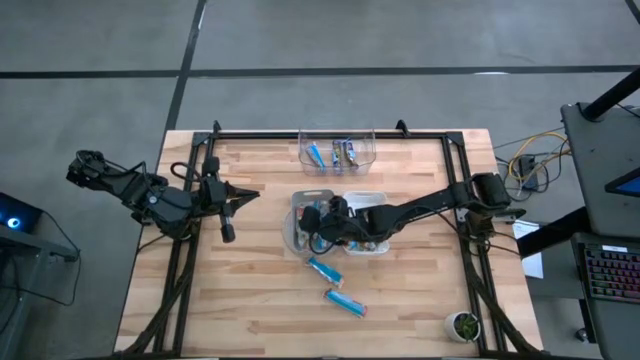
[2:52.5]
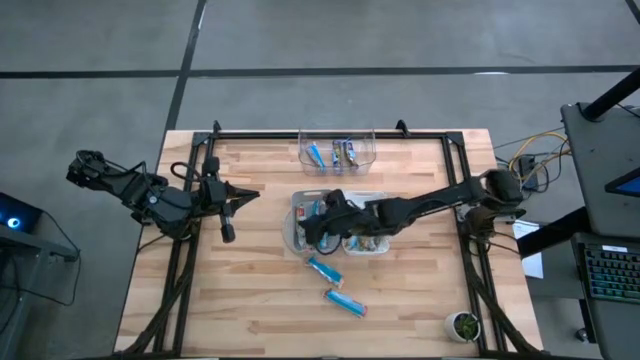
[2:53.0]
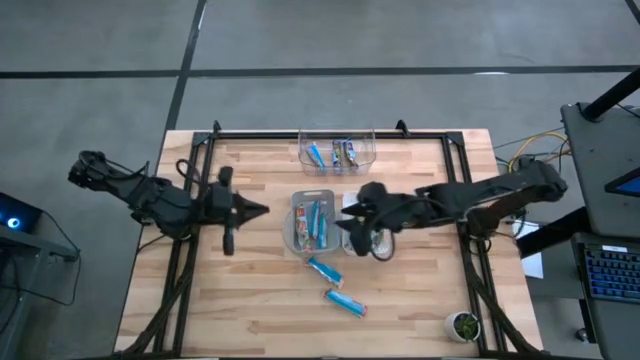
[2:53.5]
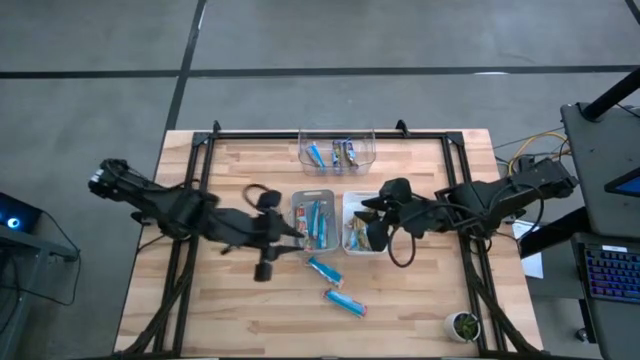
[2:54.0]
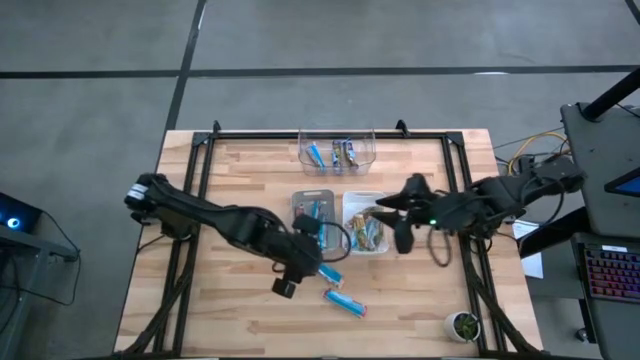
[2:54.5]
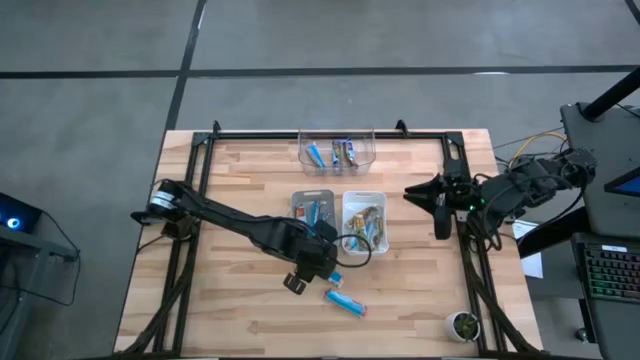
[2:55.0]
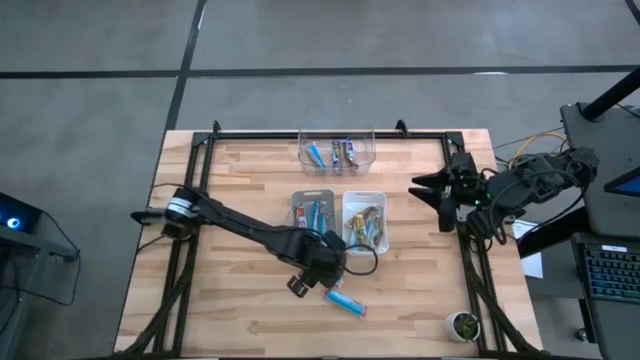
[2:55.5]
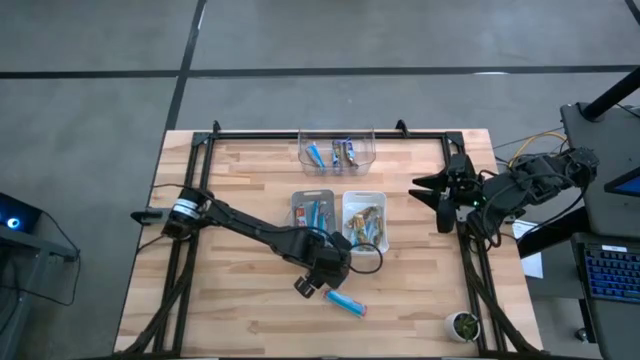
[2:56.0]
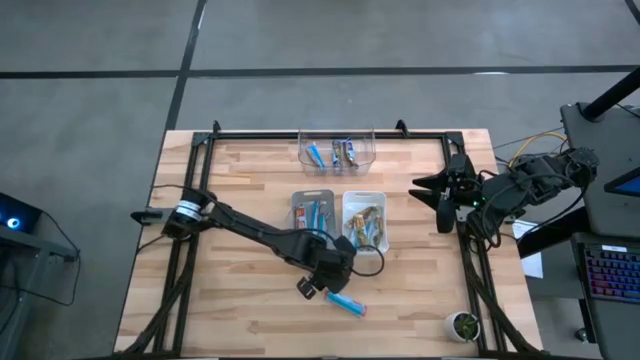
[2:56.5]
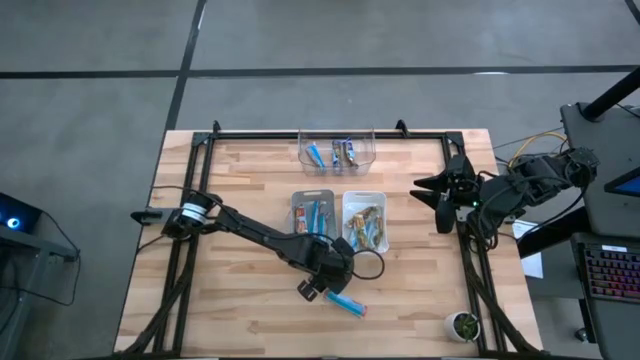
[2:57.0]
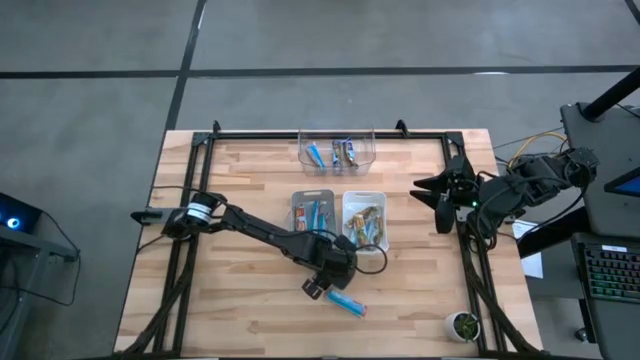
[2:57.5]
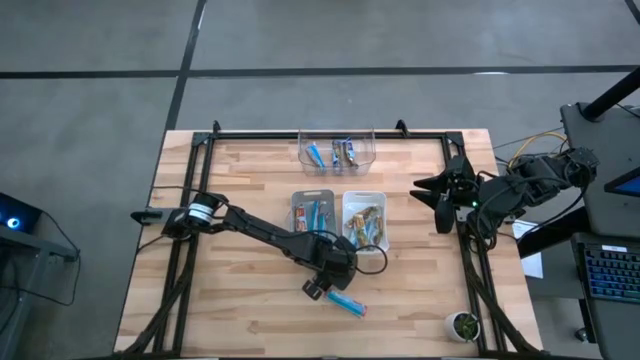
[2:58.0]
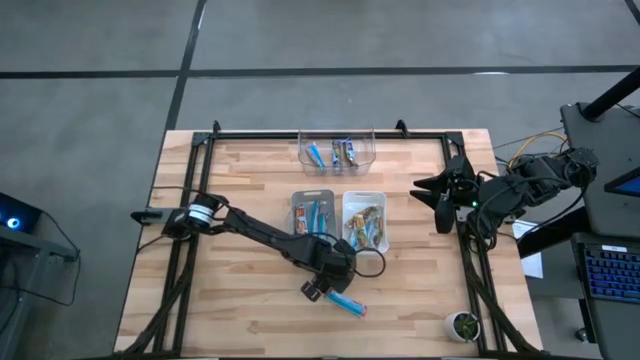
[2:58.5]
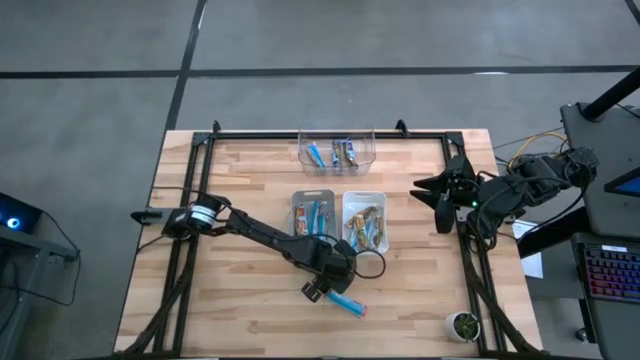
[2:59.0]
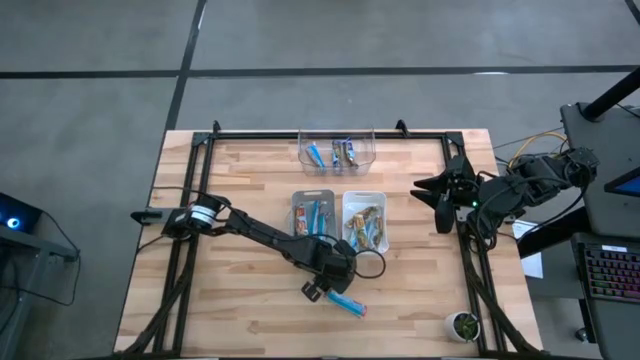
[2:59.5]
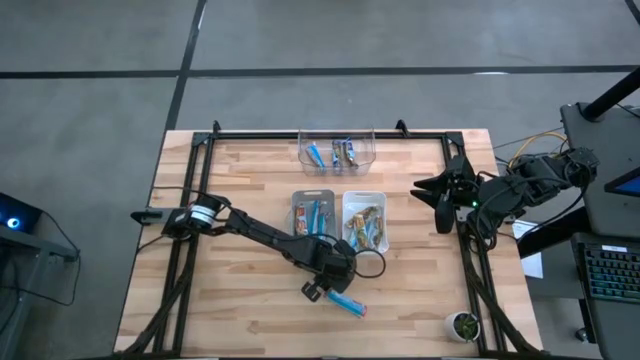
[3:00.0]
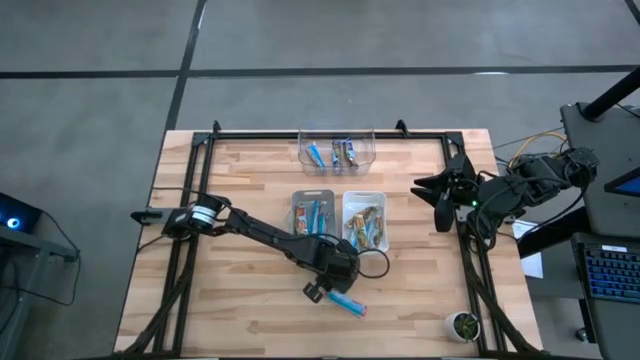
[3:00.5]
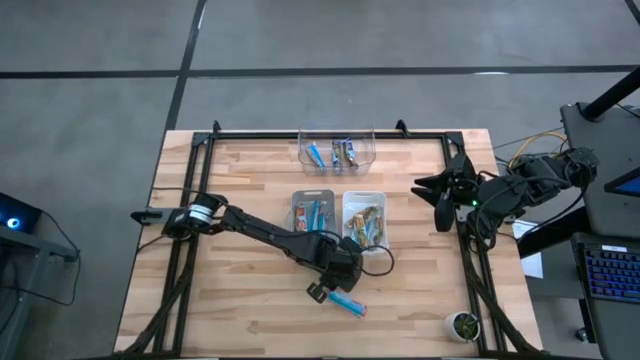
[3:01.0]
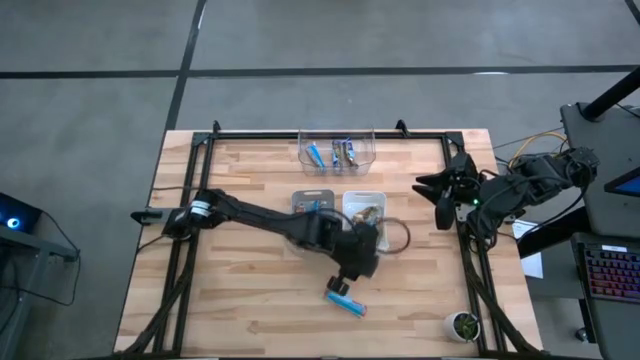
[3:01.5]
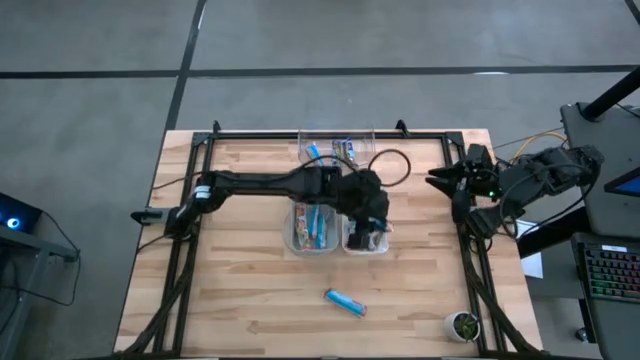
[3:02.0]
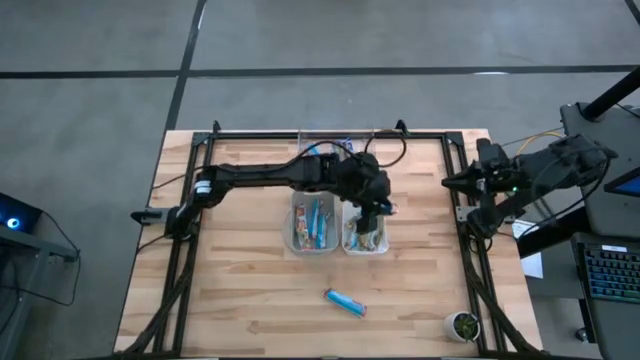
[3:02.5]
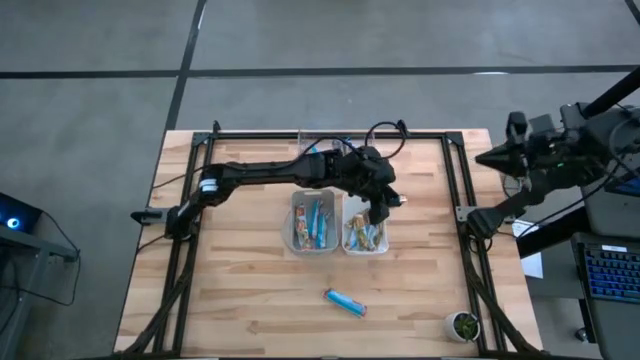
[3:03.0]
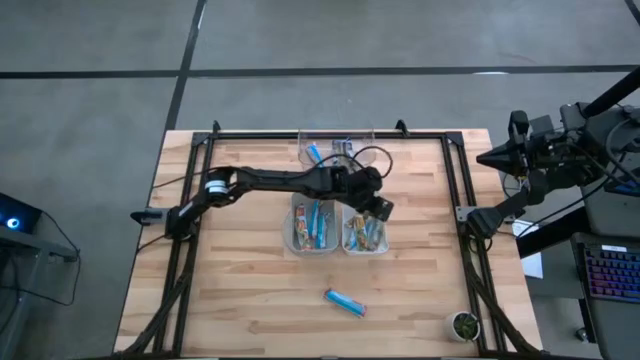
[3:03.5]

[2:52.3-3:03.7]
Task: Pick and place Granola Bars by type
Put the orange granola bar into the white bin

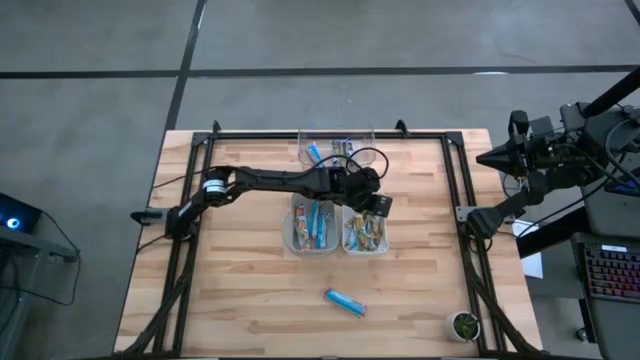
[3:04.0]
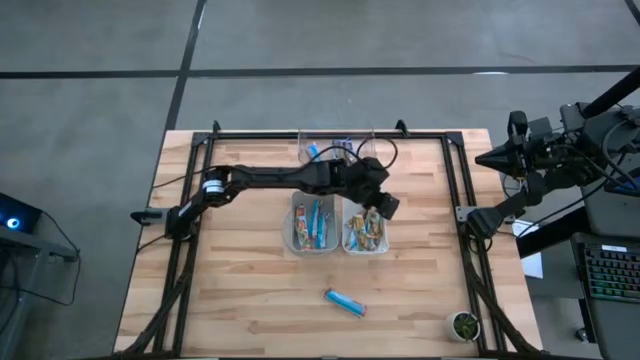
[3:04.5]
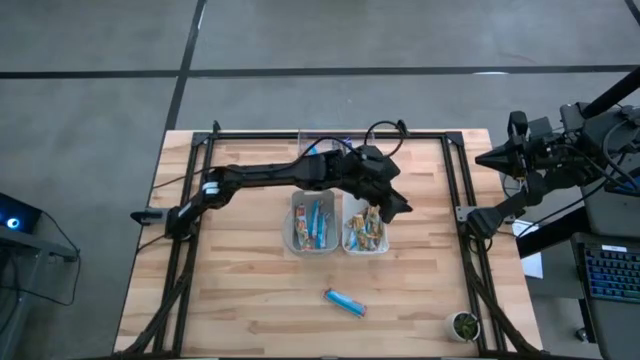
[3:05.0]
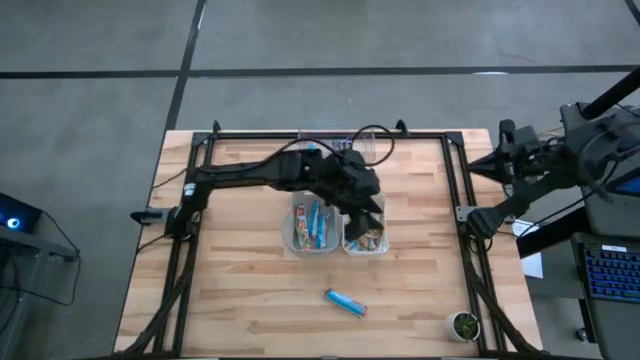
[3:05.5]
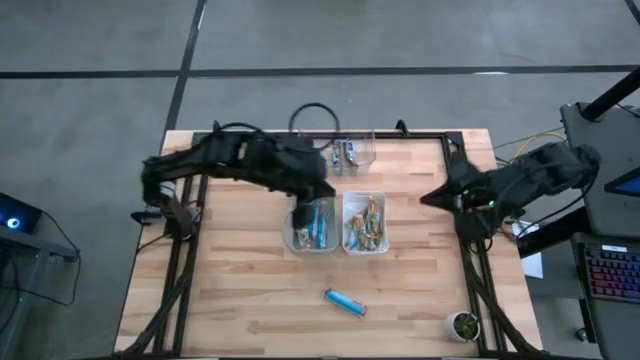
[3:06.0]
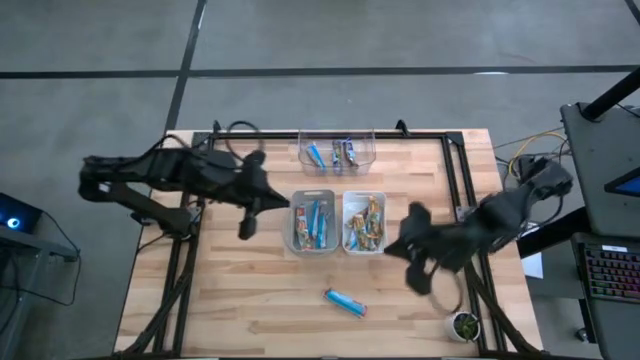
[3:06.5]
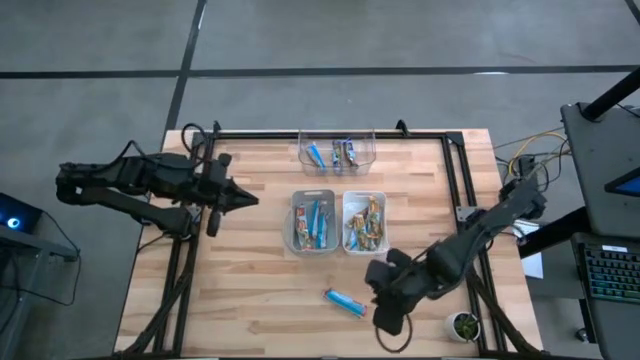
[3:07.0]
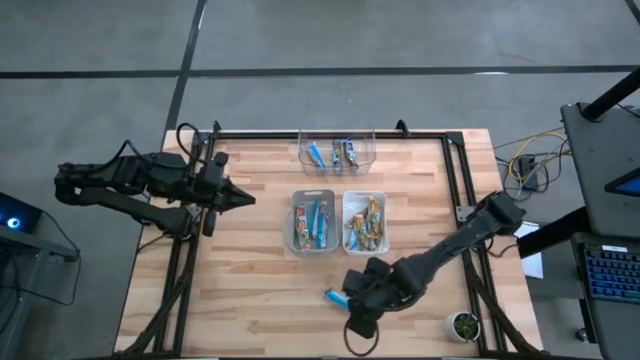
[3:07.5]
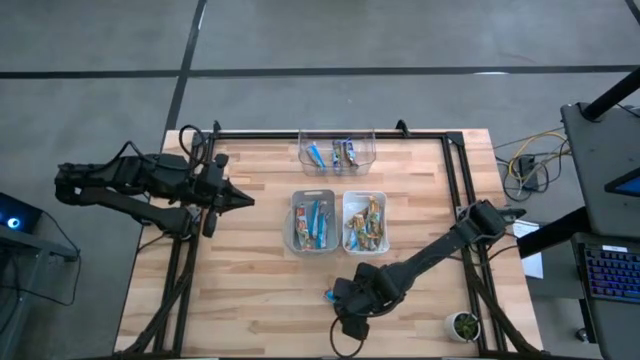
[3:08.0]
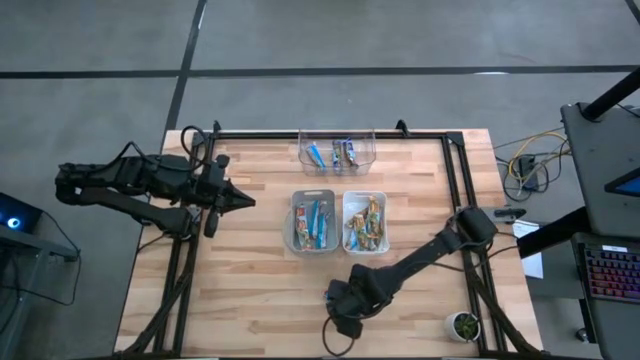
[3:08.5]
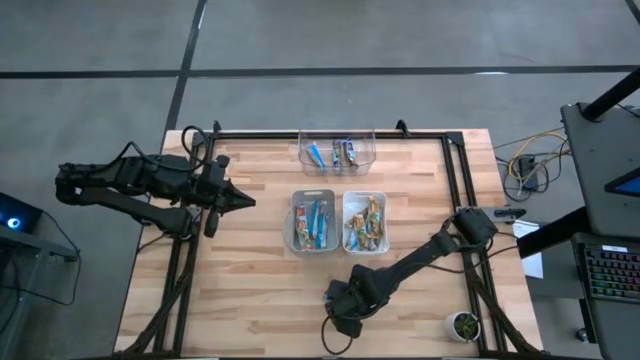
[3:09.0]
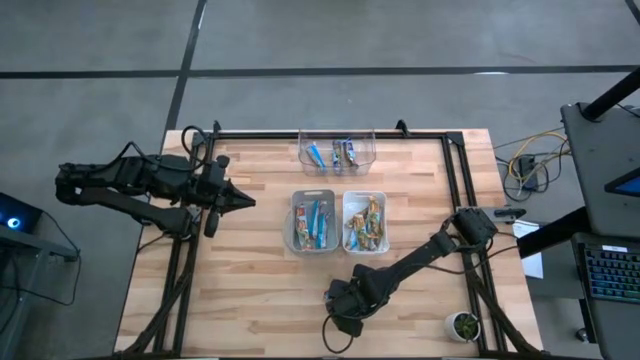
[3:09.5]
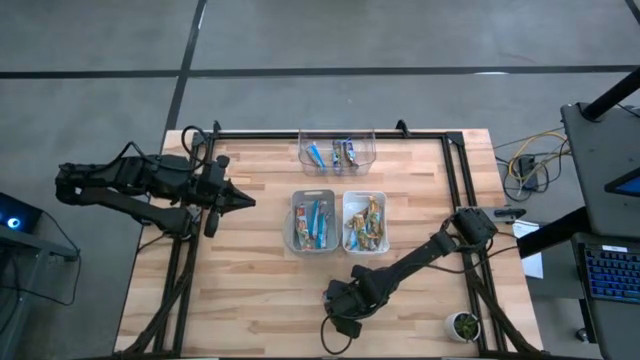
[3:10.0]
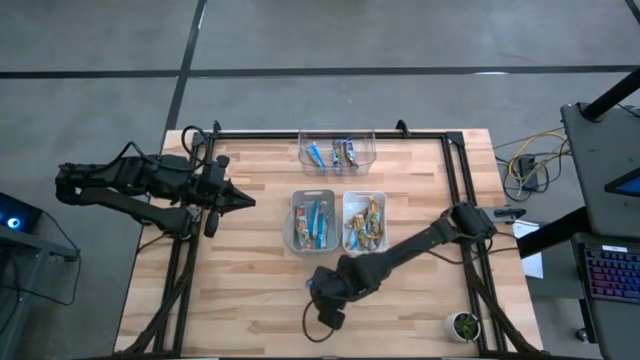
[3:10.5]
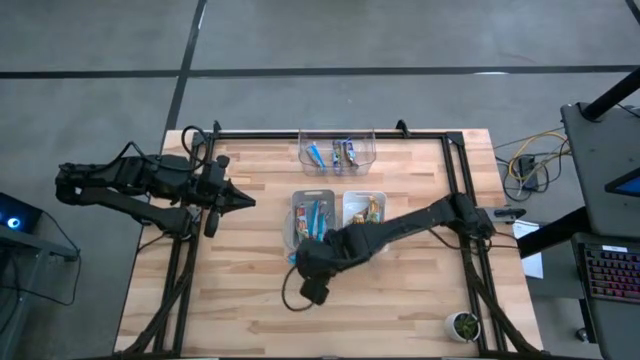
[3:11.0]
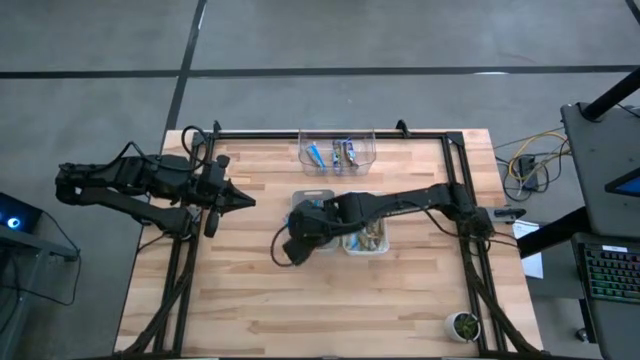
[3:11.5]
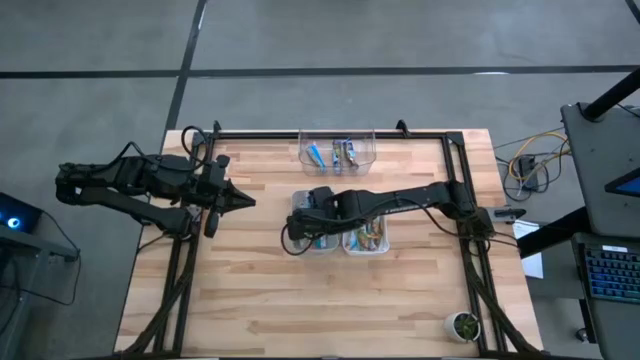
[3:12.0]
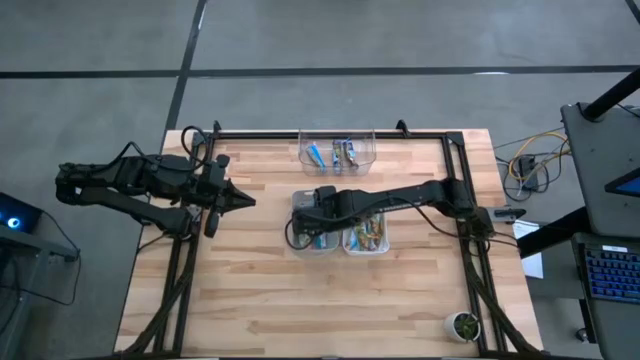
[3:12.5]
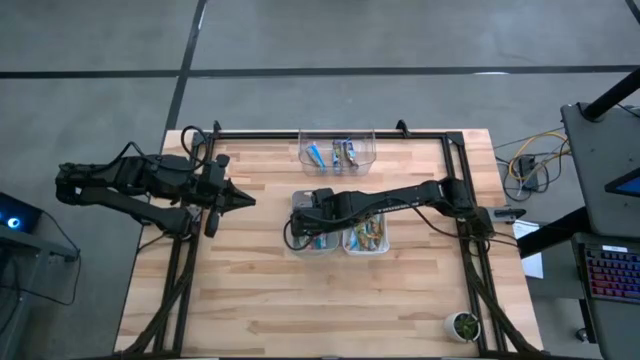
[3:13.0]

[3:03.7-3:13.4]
Put the red granola bar into the gray bin

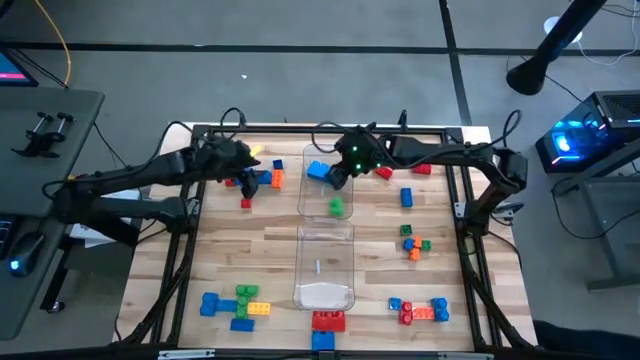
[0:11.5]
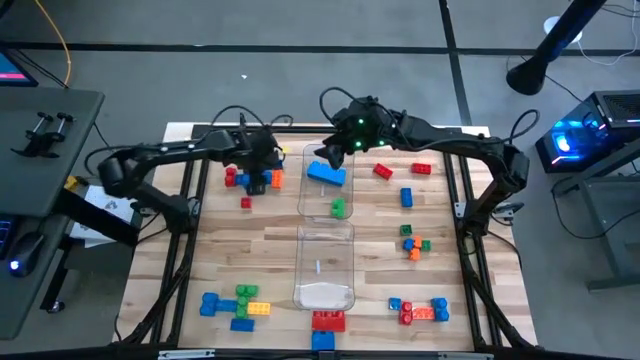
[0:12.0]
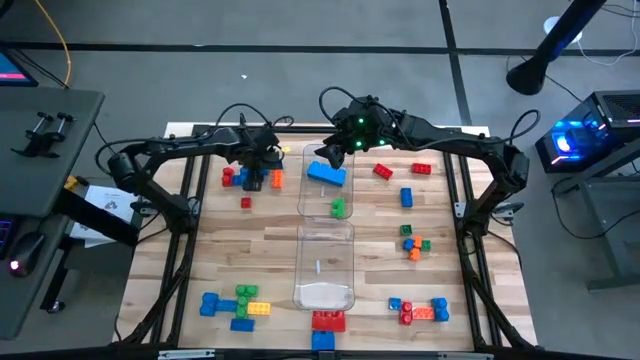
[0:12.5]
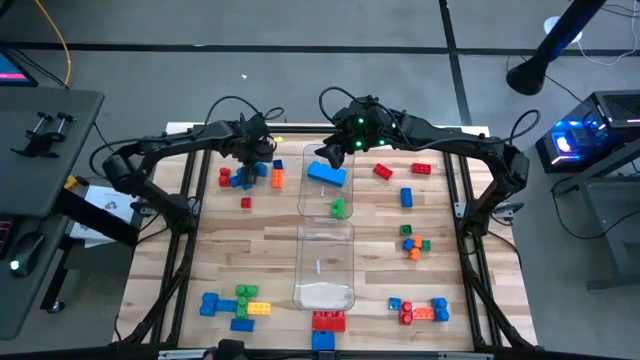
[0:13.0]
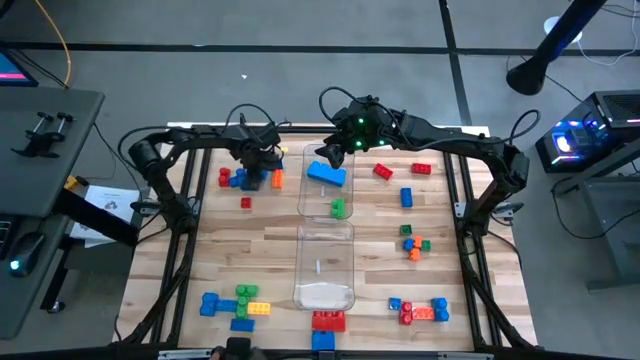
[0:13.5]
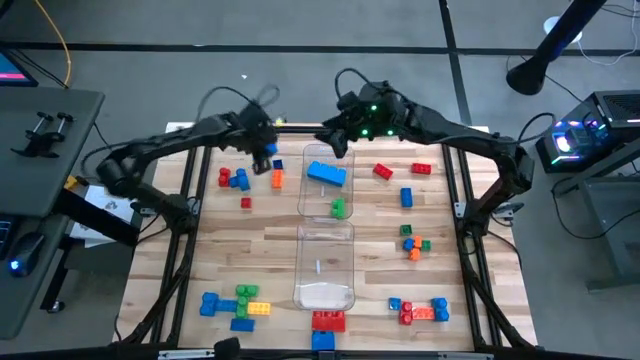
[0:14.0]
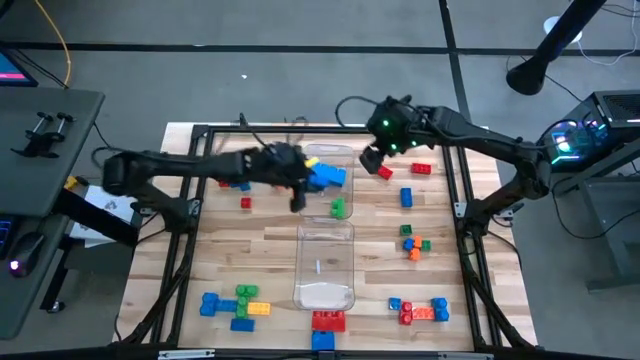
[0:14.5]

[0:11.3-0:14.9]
Task: Sort blocks by size
Put the large blue game piece in the top transparent bin
